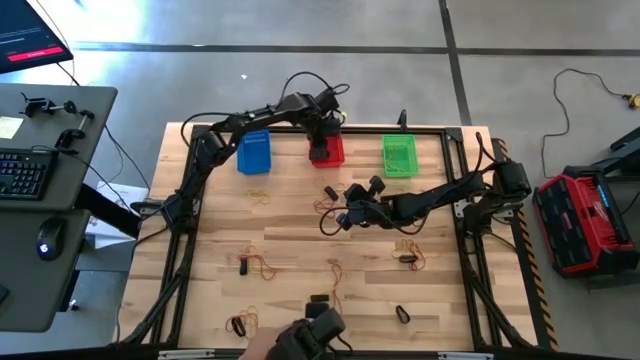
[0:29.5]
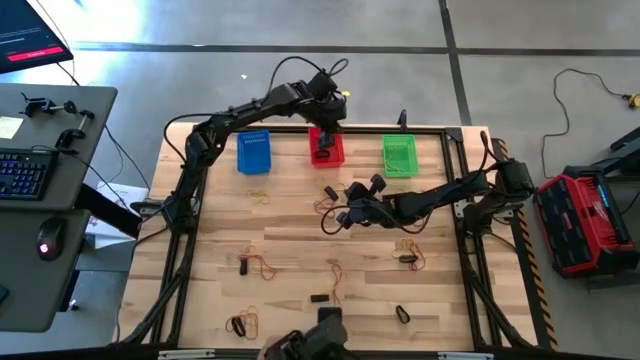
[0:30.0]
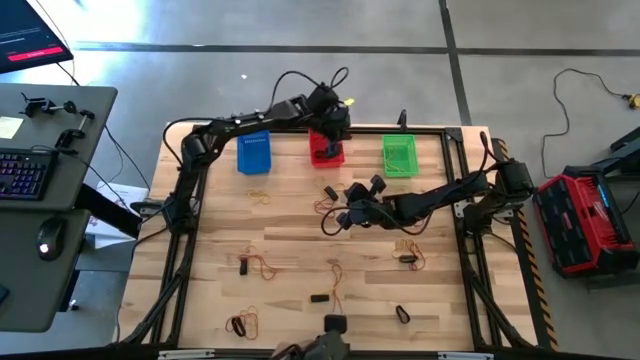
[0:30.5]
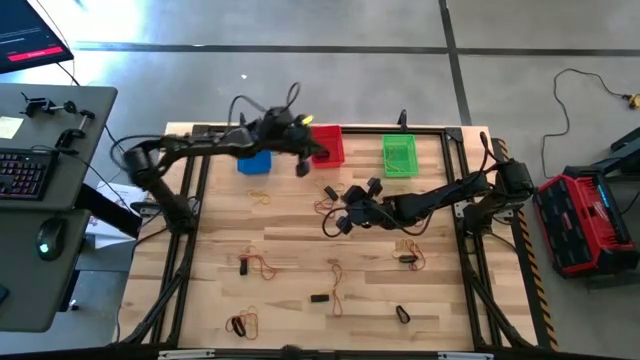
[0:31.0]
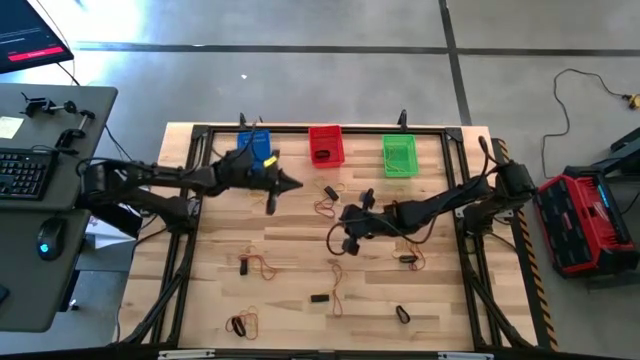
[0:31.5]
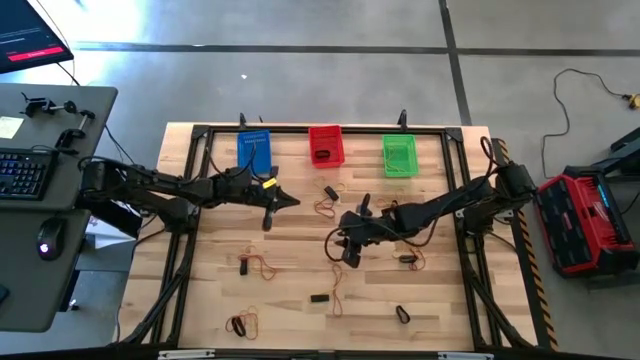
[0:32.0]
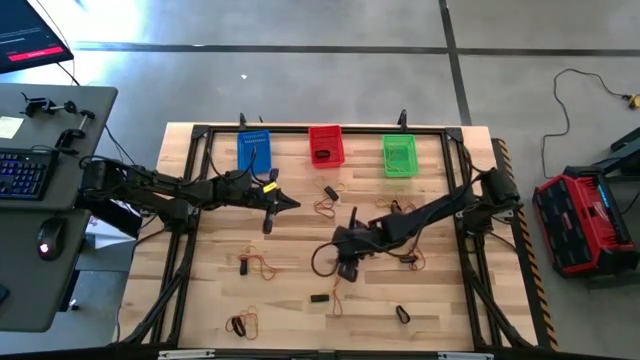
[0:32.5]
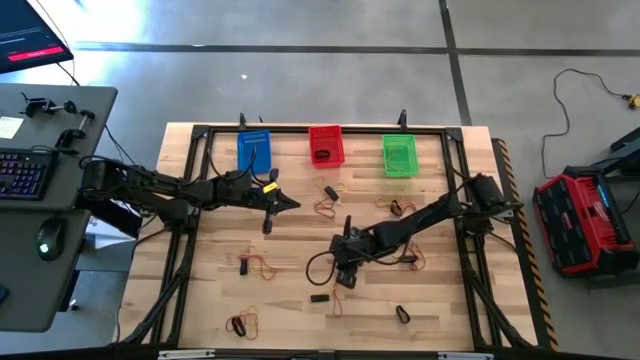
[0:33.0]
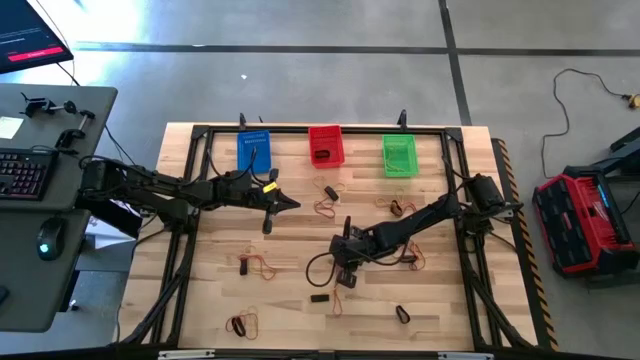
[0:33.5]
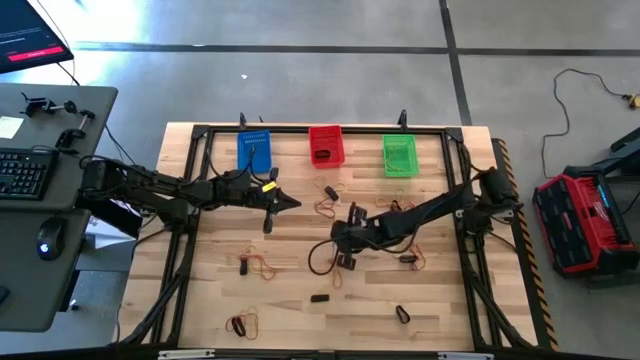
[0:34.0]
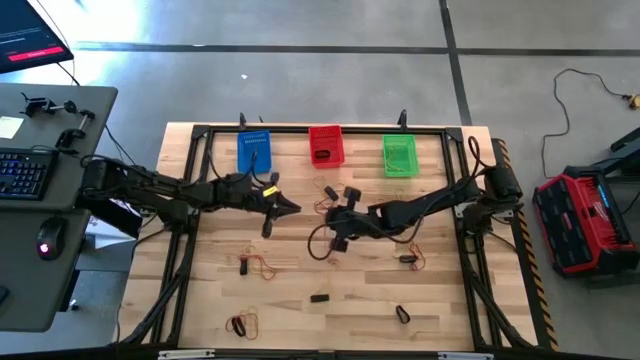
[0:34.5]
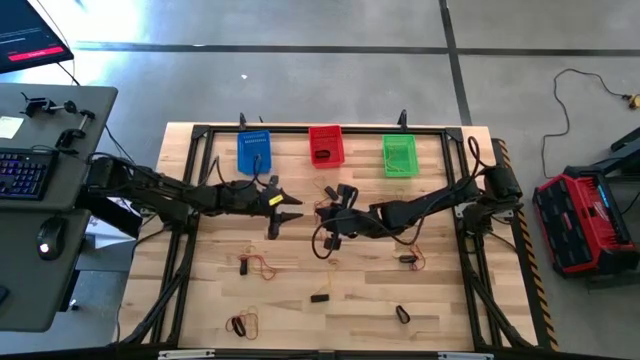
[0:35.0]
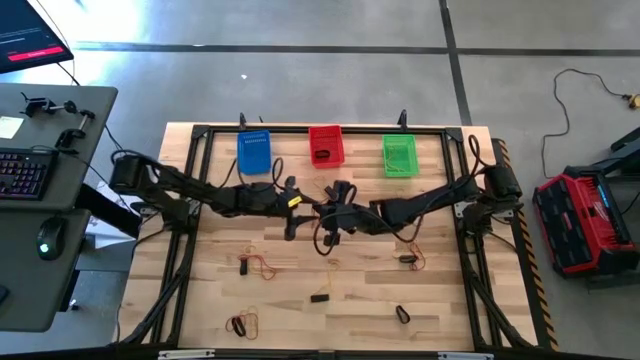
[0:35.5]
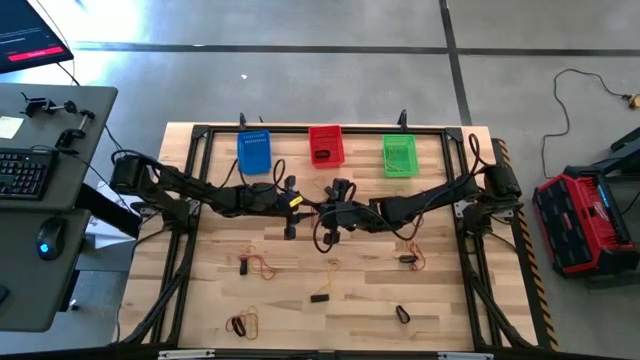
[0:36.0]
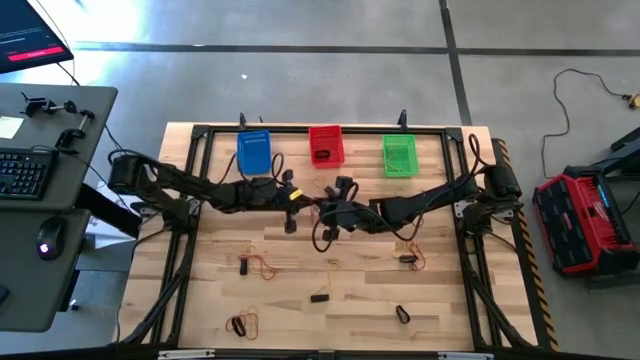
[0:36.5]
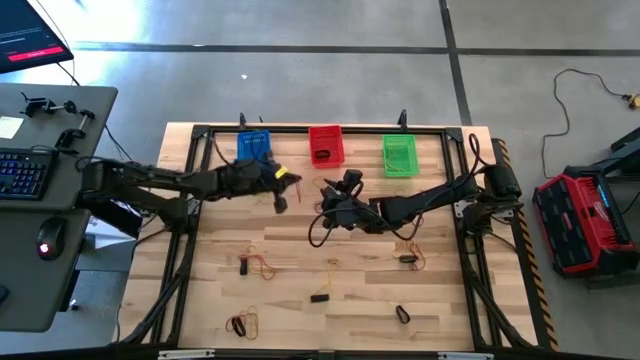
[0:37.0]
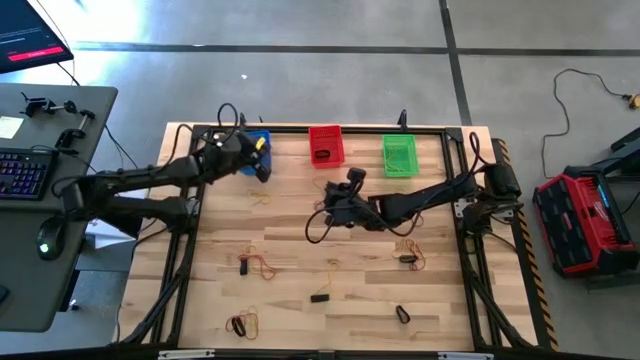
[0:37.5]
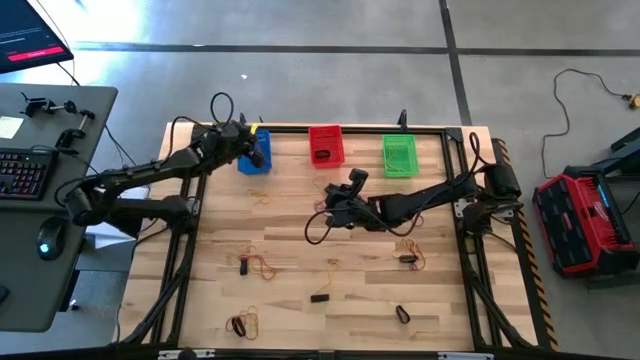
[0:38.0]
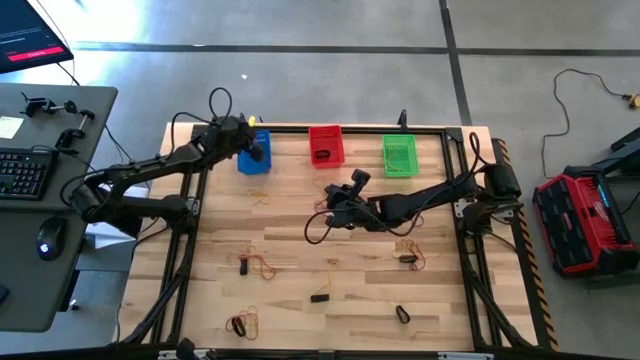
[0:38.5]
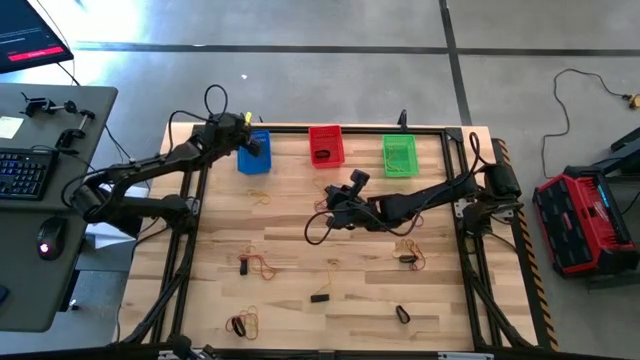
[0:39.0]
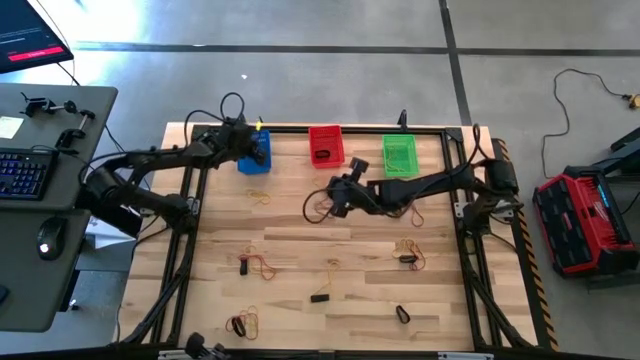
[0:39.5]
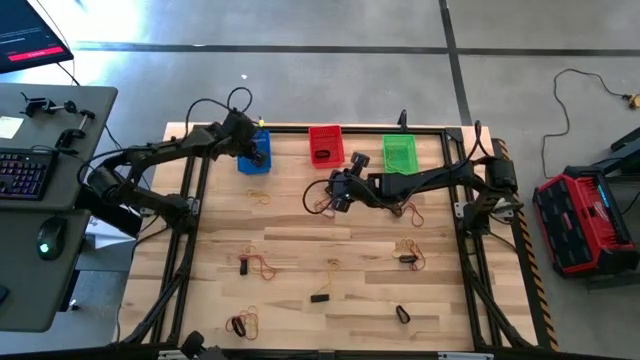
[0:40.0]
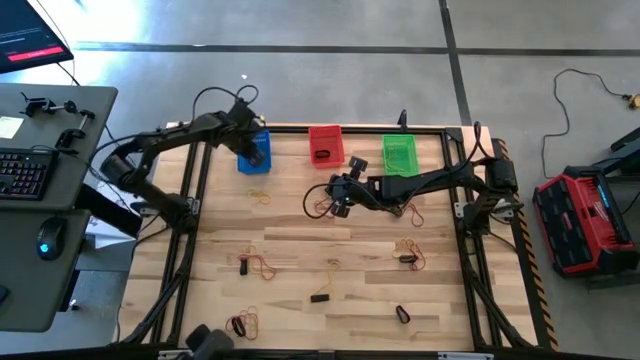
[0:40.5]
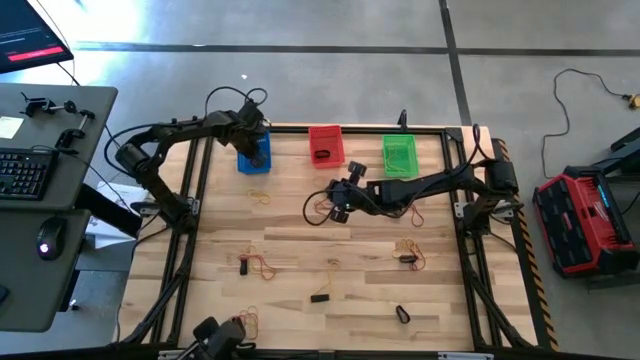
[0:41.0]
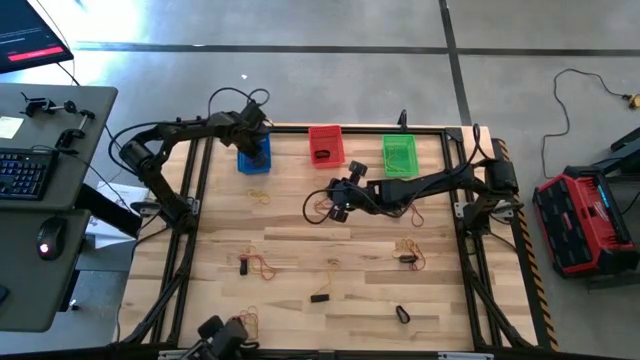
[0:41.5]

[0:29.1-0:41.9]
Task: Sort rubber bands into baskets
Put the red rubber band into the blue bin

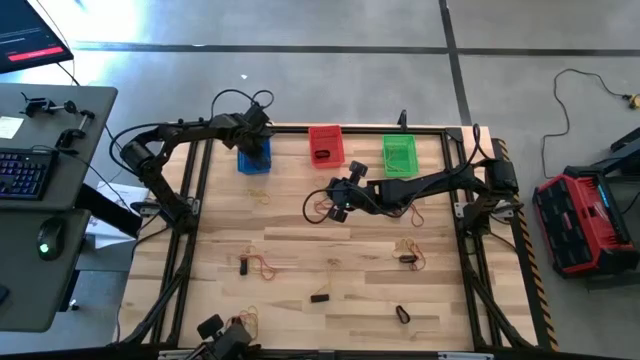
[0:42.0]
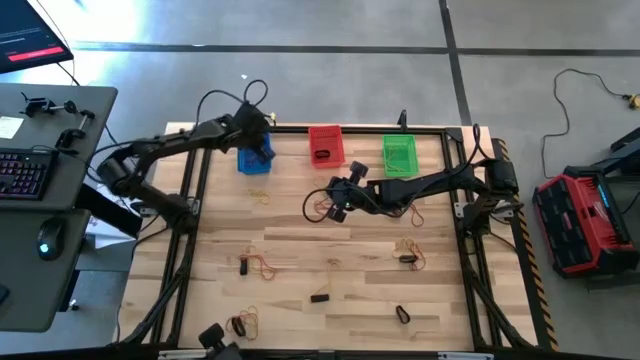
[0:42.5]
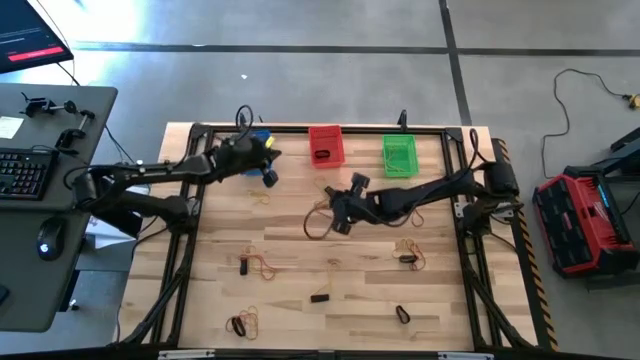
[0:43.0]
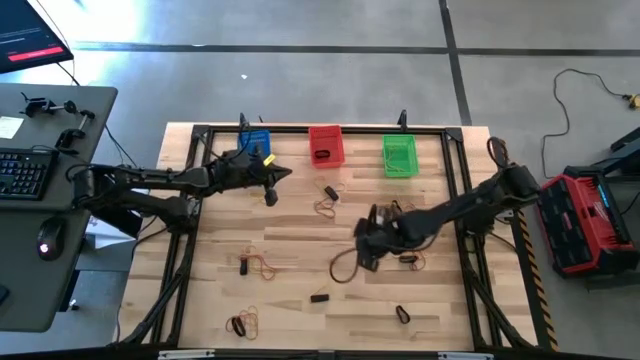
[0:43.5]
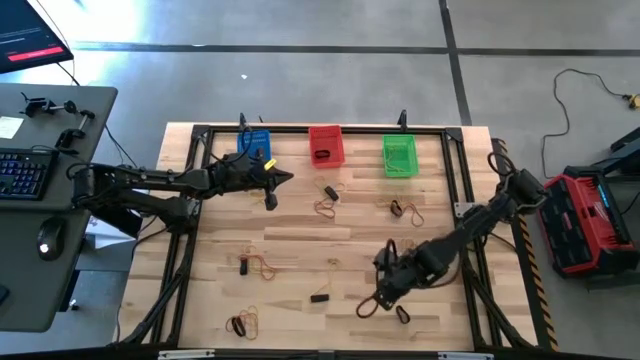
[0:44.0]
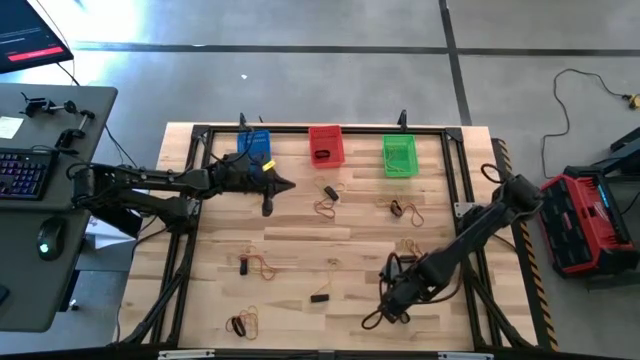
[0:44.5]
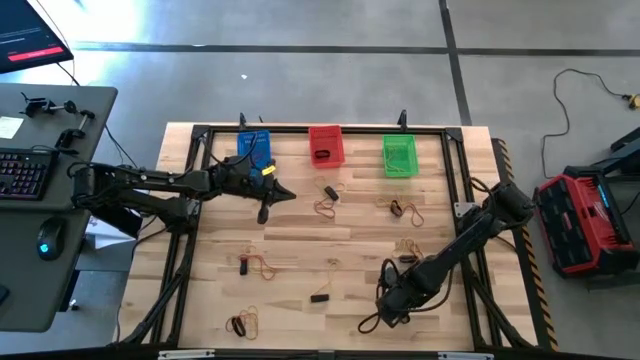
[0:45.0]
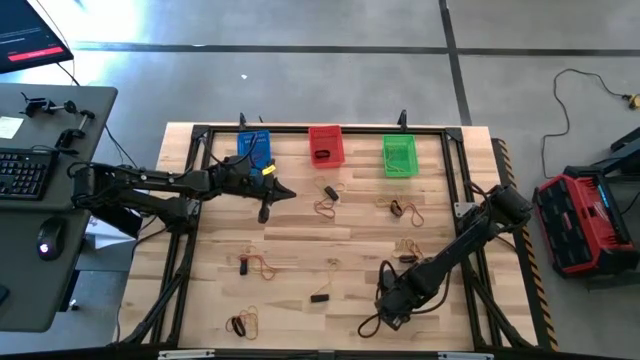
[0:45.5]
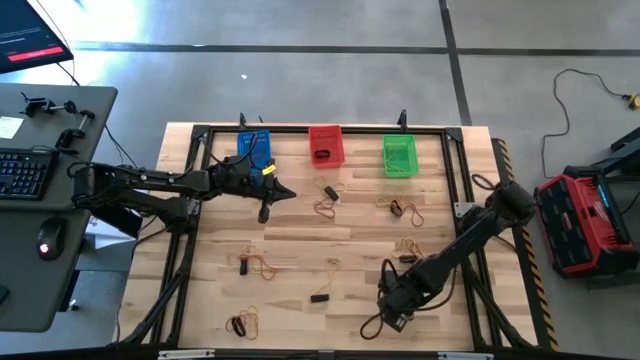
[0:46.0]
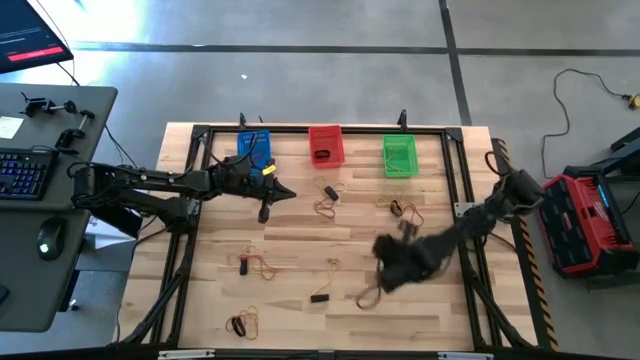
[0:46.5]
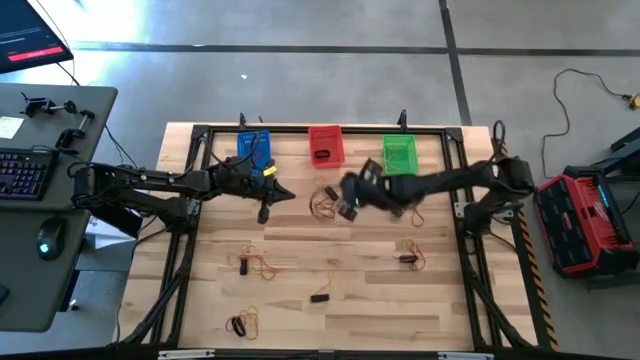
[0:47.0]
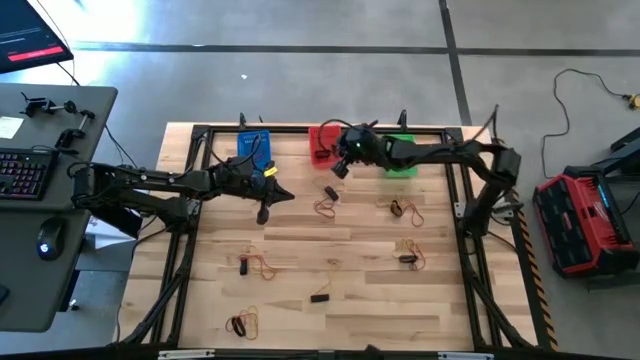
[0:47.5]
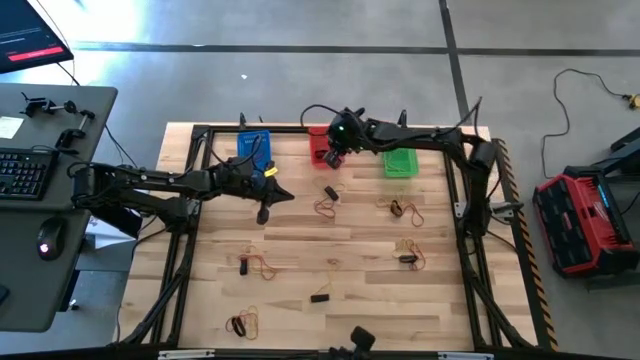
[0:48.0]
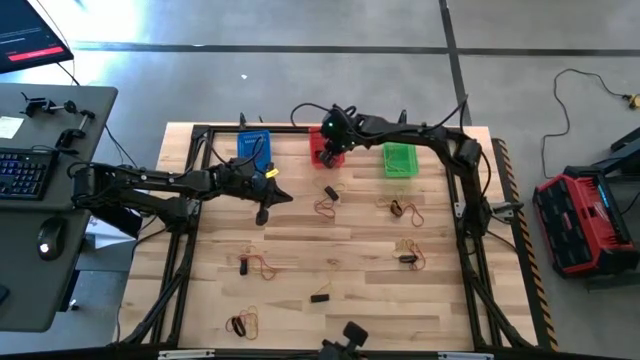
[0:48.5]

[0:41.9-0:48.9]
Put the black rubber band into the red bin
